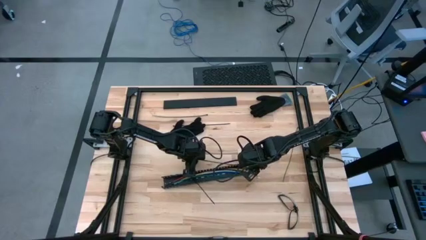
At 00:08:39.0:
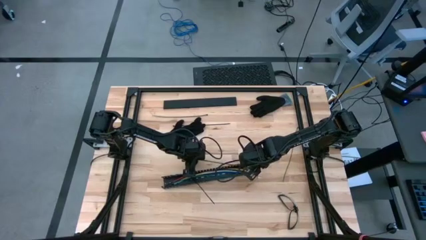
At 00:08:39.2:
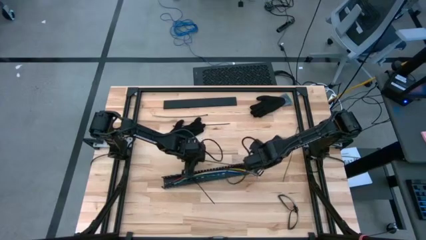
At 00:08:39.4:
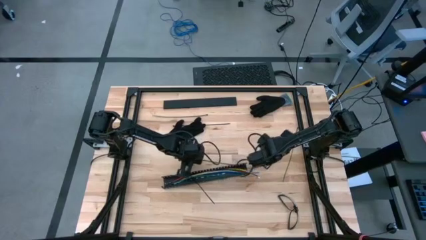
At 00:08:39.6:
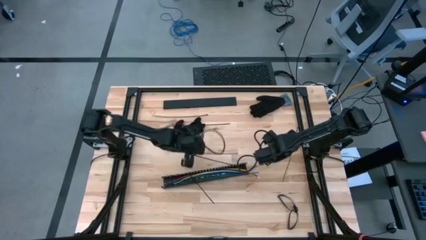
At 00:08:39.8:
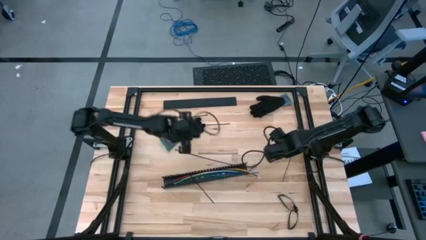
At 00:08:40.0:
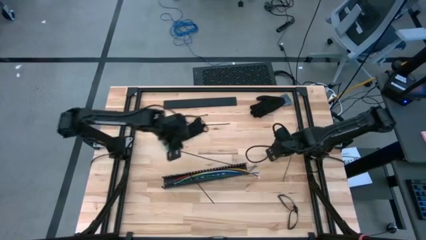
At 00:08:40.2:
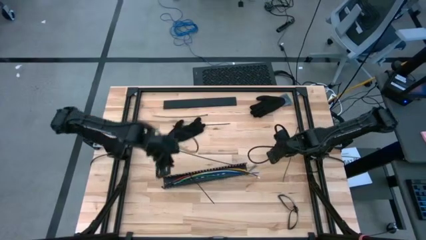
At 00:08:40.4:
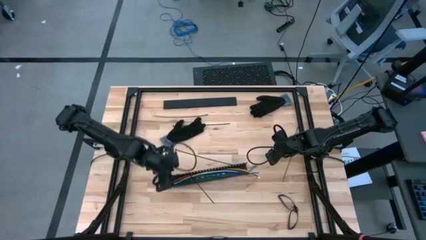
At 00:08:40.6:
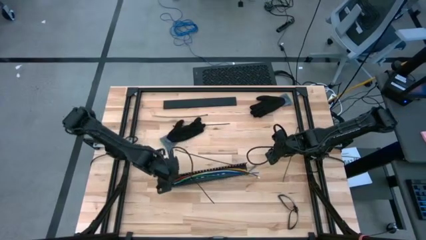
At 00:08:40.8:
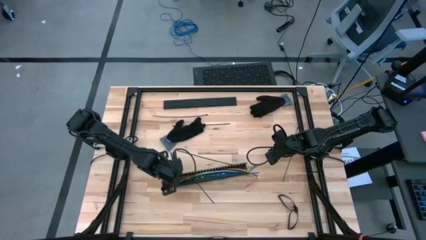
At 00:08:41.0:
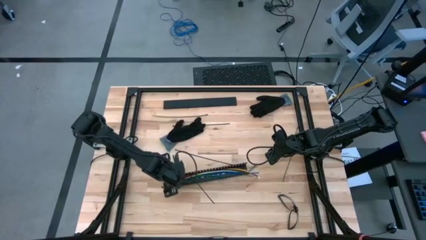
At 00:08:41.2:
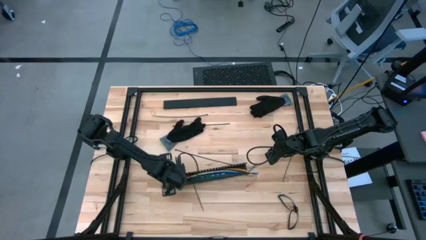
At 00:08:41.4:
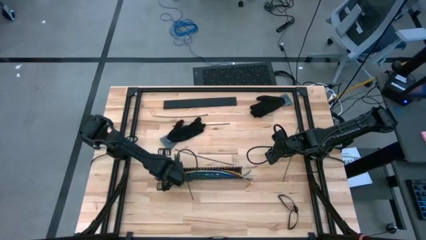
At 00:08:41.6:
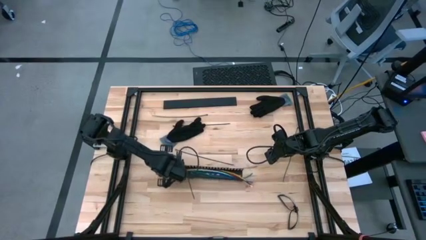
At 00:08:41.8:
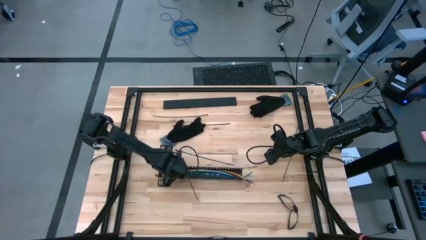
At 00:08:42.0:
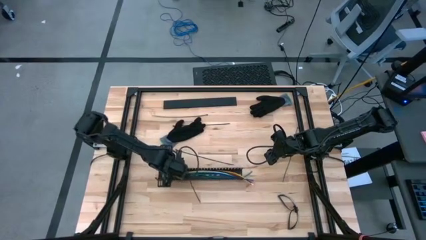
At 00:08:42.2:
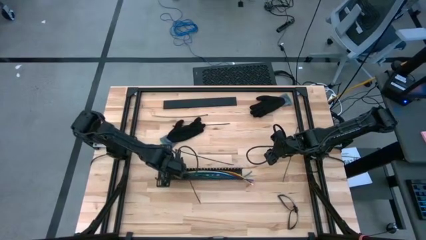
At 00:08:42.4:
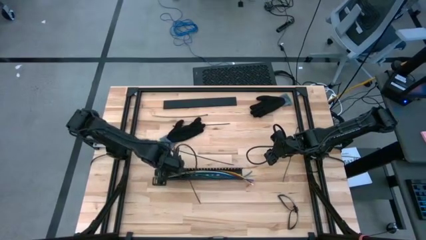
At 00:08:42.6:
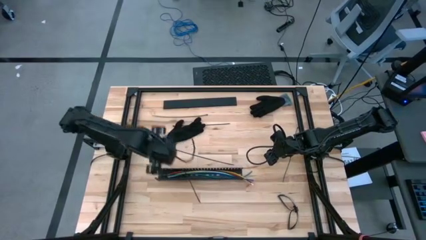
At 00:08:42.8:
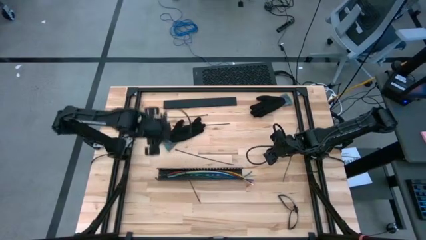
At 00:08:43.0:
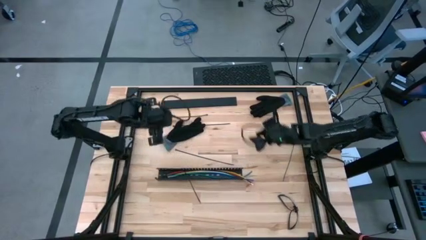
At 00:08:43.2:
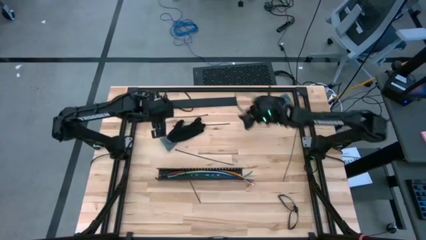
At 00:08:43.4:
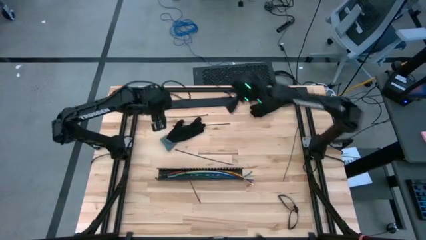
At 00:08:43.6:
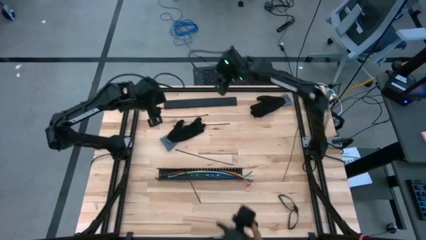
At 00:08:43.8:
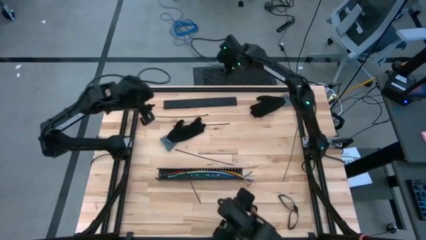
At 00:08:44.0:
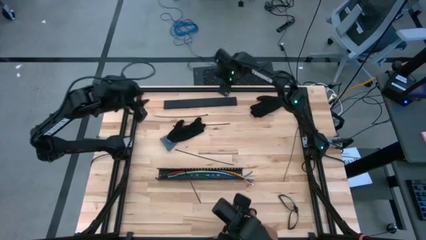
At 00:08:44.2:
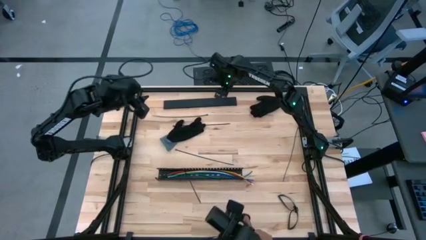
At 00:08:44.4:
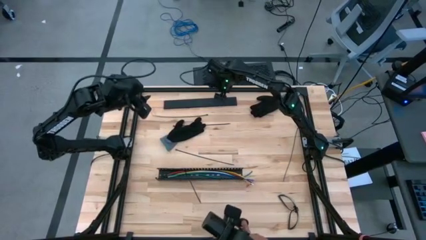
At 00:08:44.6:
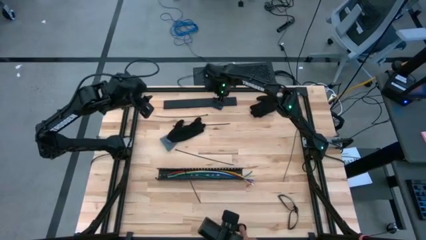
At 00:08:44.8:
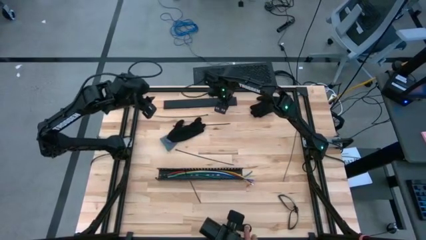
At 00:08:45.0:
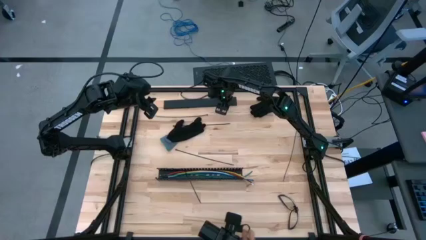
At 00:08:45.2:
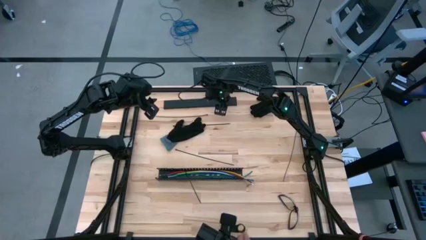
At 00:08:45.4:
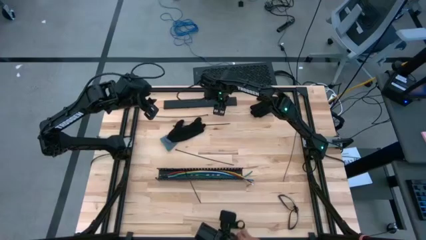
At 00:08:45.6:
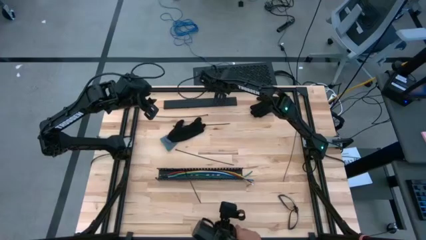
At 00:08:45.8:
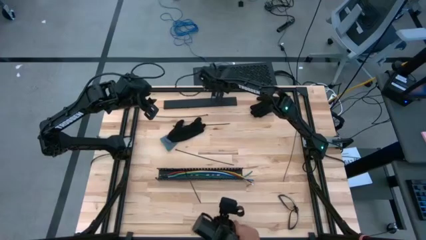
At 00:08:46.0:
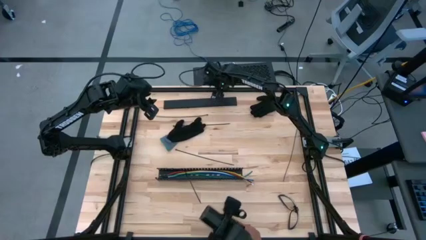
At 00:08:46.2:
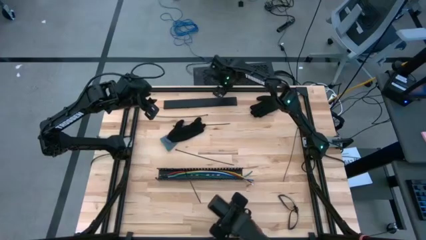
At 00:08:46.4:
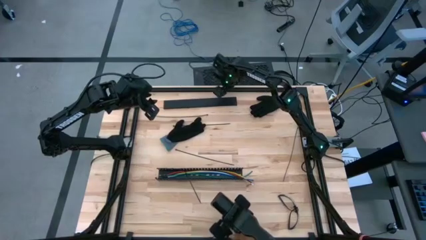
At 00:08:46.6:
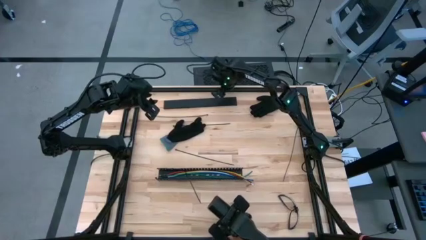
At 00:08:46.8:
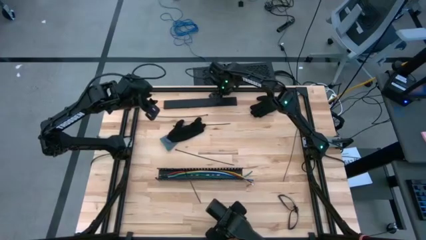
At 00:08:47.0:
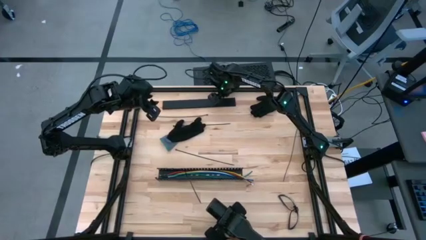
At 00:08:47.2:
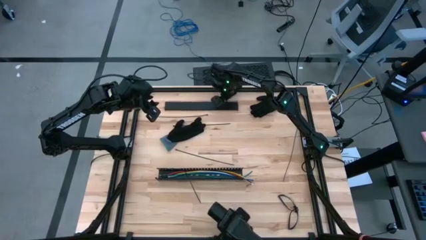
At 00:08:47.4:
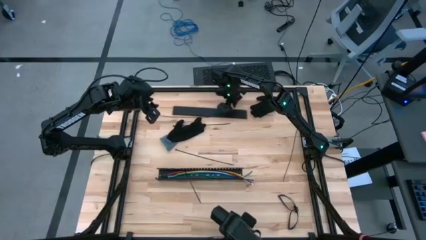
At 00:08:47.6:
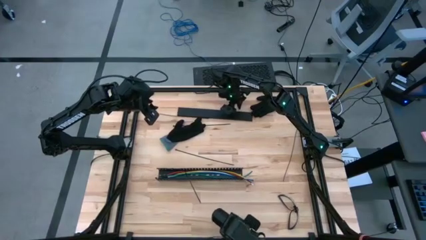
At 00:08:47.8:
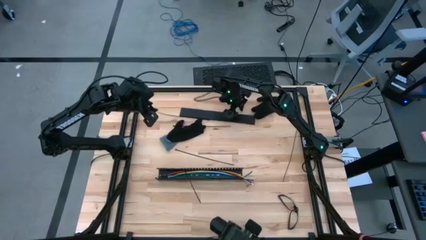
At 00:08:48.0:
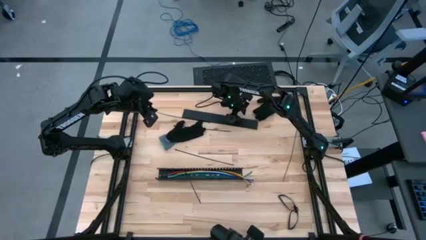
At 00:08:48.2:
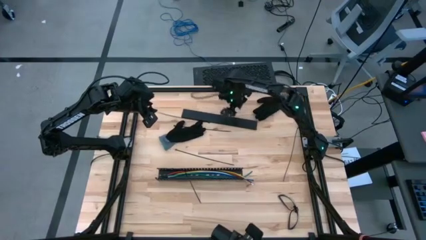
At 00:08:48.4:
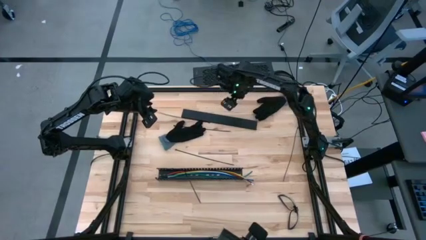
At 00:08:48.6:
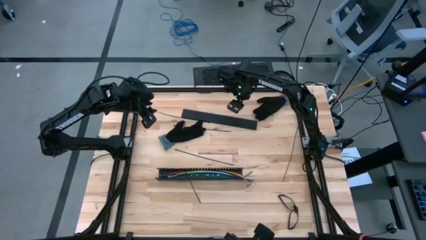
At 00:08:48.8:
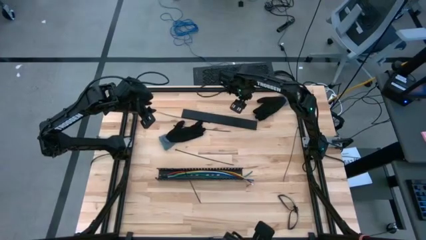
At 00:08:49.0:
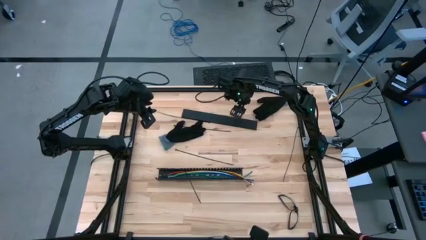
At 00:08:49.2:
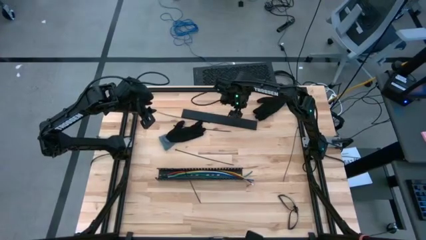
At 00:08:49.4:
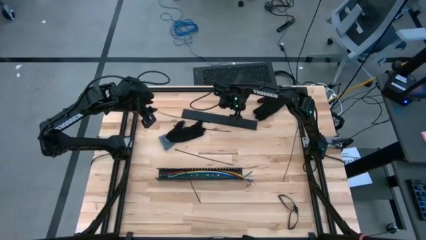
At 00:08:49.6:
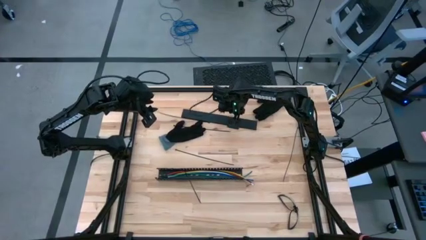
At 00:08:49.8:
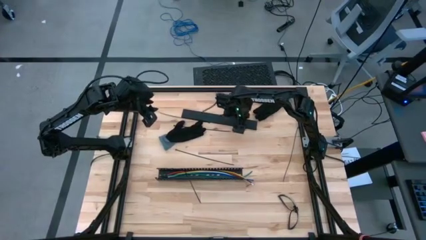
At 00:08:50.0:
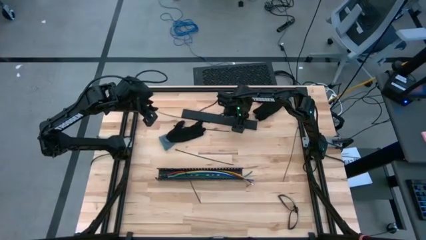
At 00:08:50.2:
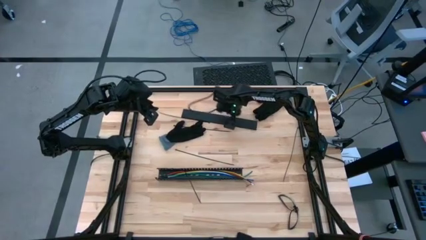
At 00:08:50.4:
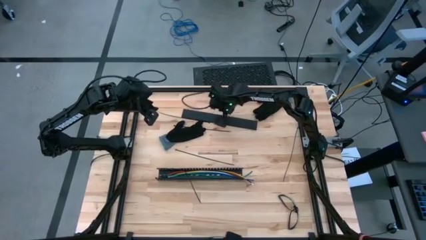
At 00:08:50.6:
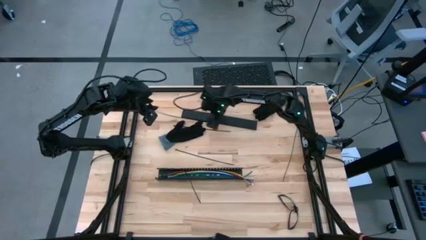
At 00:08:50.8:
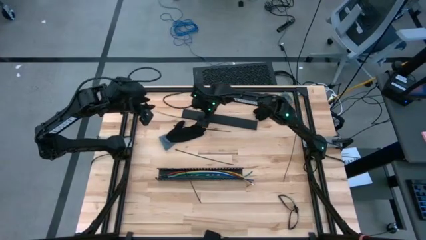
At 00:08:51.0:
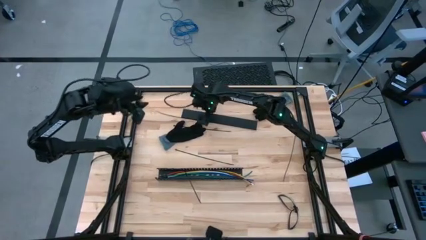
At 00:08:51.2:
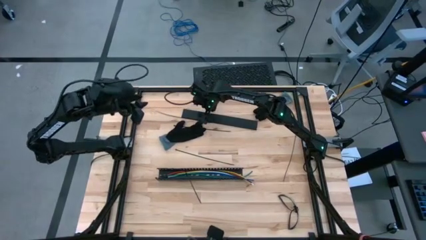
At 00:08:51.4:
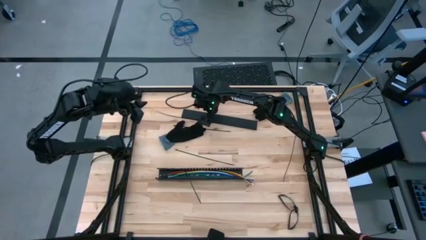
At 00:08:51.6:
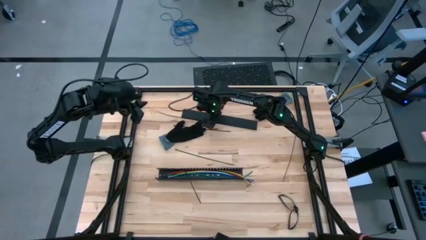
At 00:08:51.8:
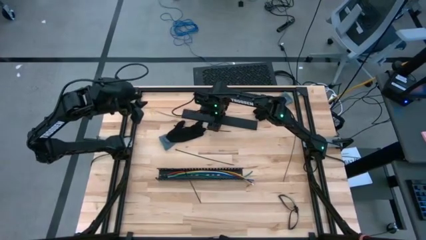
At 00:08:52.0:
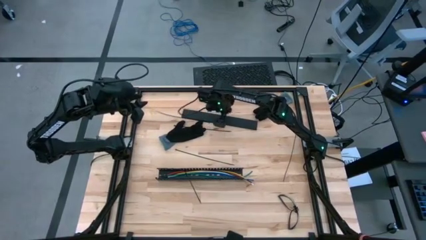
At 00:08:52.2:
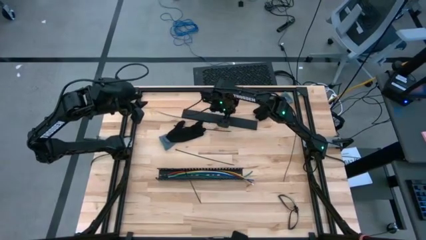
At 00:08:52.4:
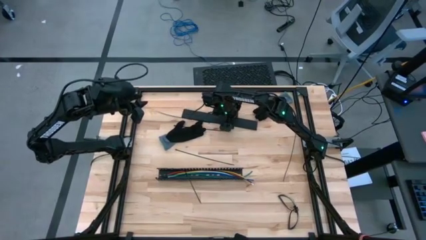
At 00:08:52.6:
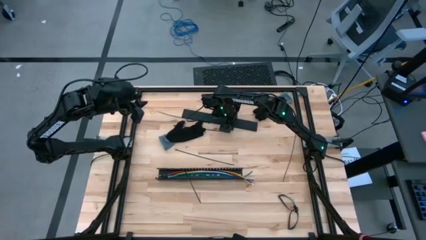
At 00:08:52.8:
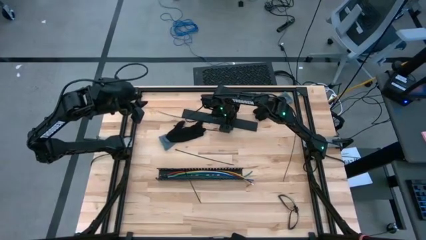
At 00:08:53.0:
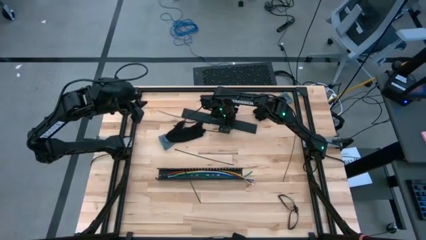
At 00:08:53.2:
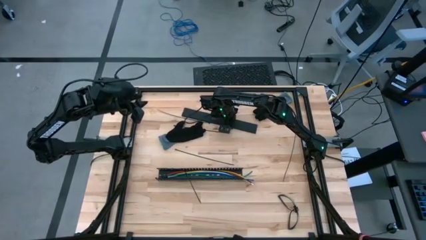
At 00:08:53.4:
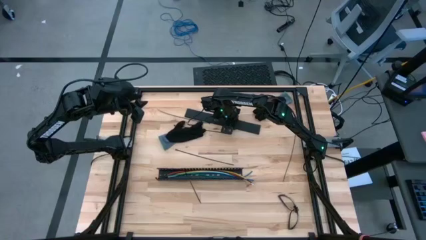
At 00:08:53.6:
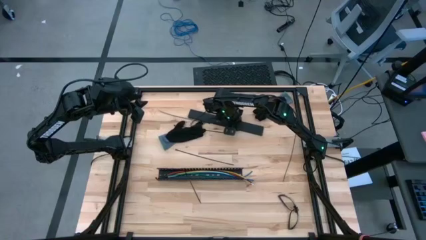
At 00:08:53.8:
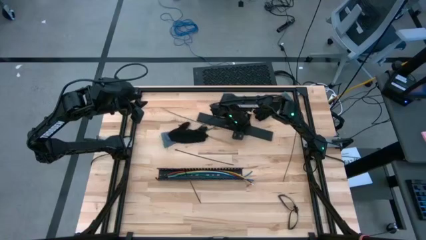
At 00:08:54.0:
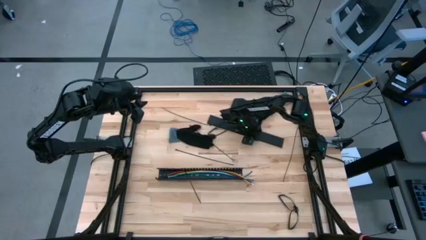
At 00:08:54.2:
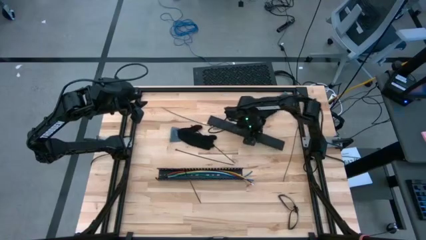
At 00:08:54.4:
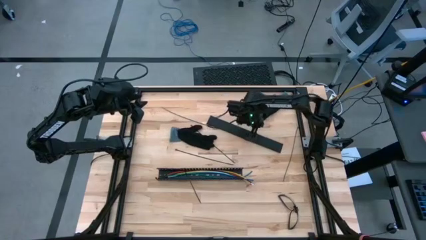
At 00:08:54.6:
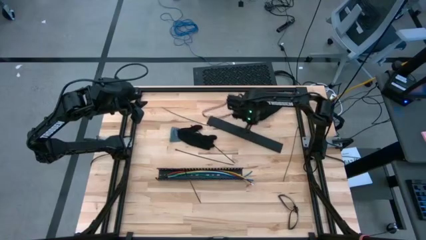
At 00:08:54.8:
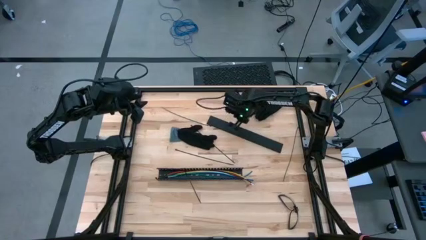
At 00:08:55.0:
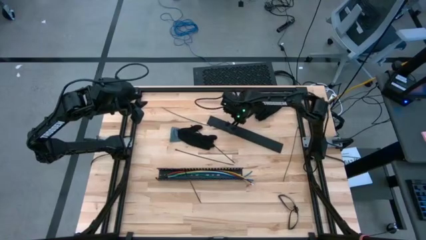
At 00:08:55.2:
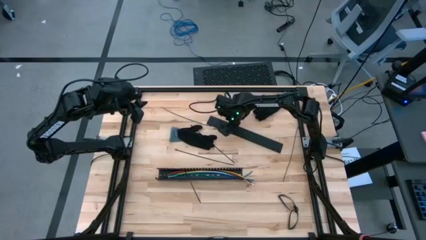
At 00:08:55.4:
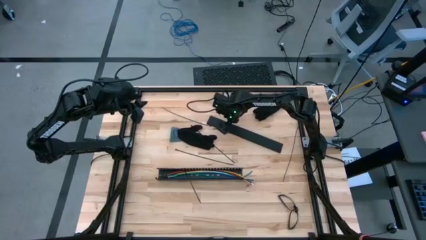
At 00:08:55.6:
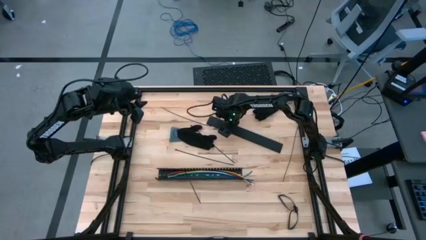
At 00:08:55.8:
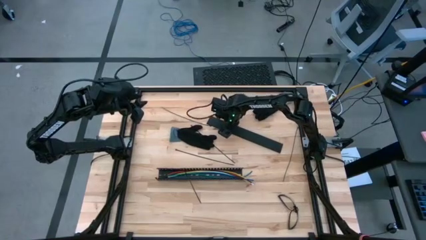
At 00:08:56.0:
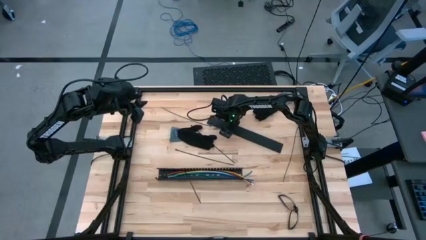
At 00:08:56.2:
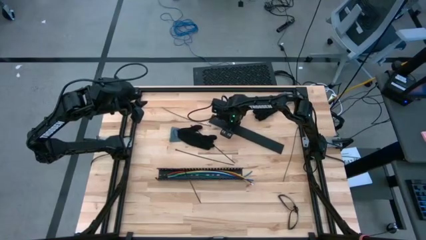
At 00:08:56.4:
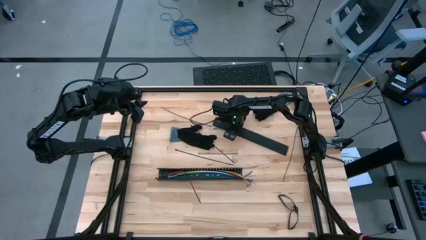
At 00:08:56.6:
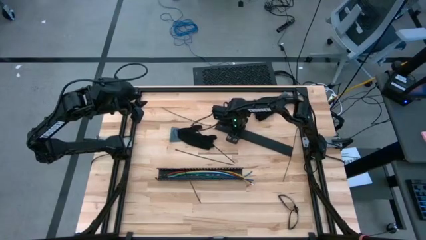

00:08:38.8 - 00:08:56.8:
Task: Ziptie cables
Close the cable duct
